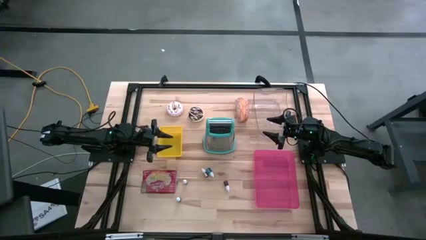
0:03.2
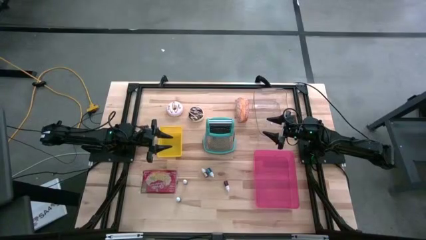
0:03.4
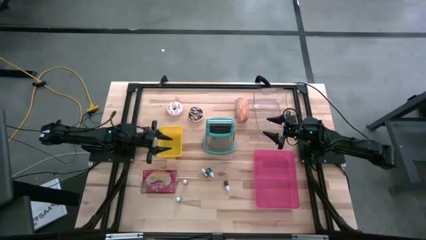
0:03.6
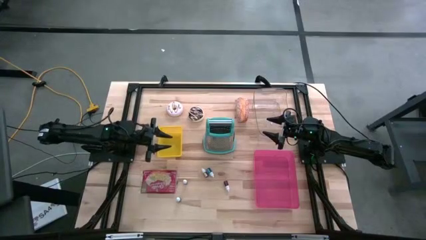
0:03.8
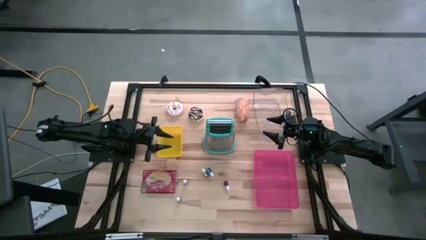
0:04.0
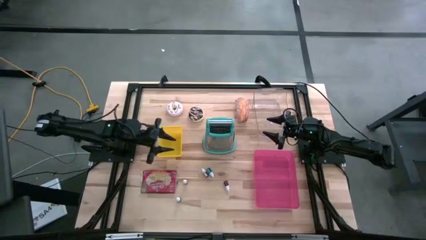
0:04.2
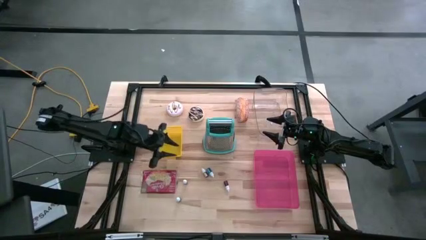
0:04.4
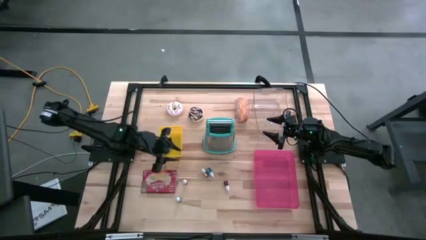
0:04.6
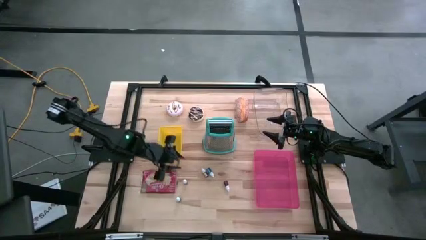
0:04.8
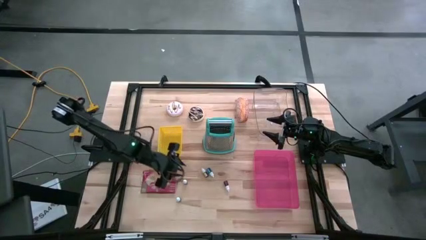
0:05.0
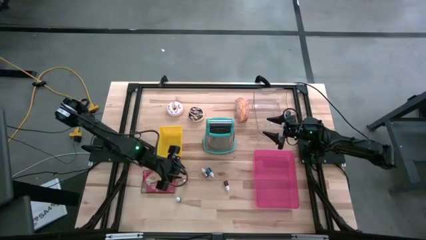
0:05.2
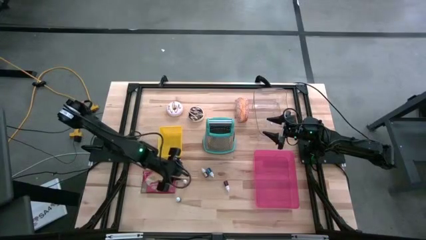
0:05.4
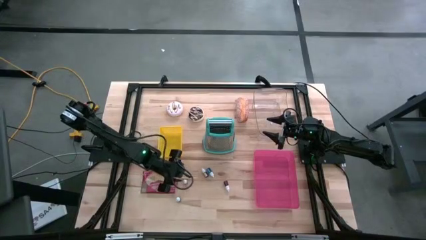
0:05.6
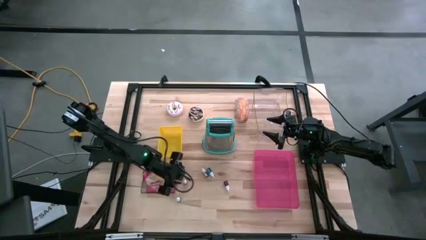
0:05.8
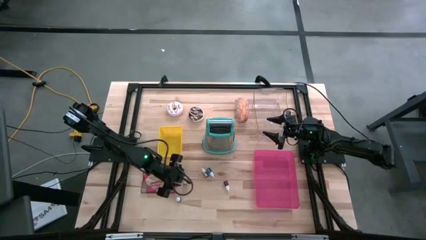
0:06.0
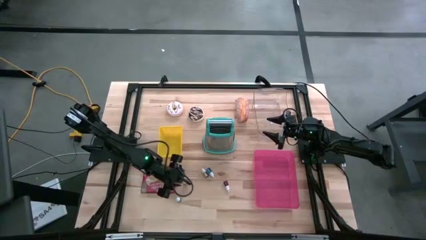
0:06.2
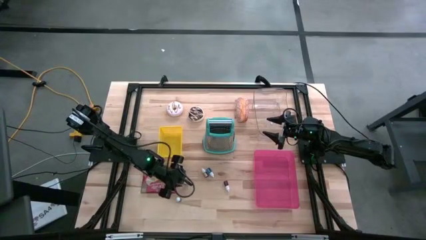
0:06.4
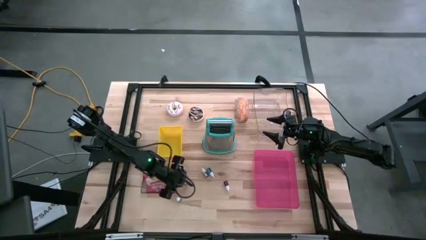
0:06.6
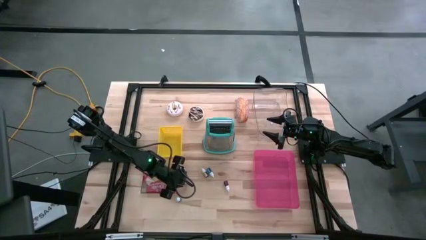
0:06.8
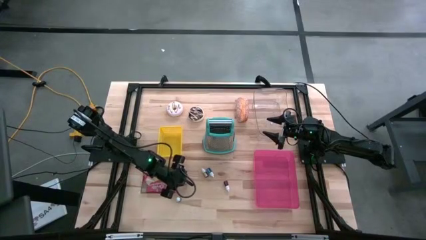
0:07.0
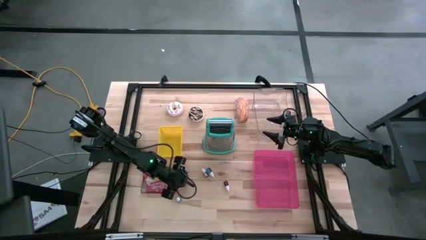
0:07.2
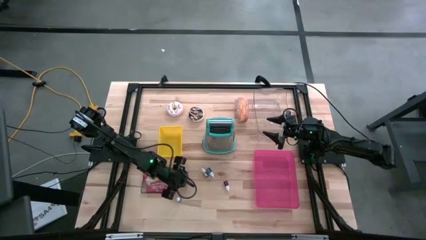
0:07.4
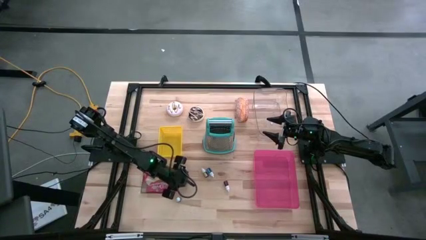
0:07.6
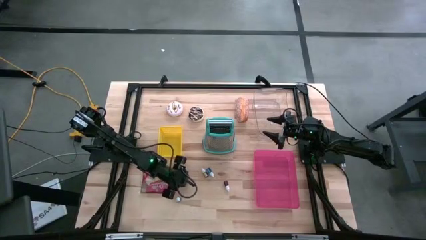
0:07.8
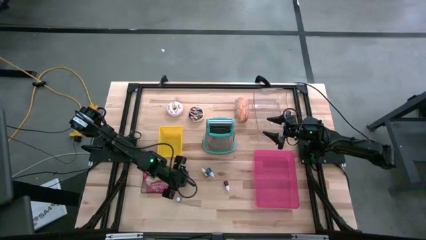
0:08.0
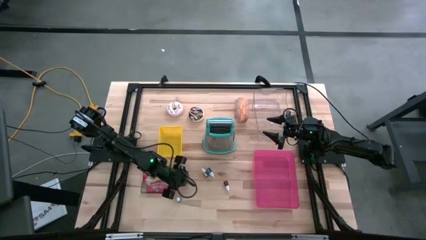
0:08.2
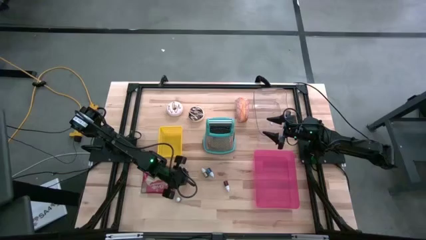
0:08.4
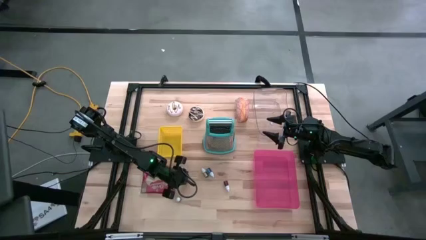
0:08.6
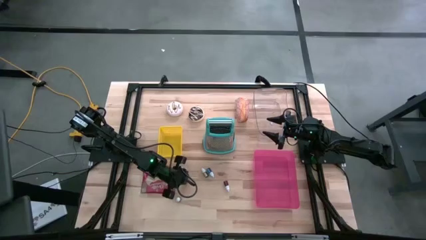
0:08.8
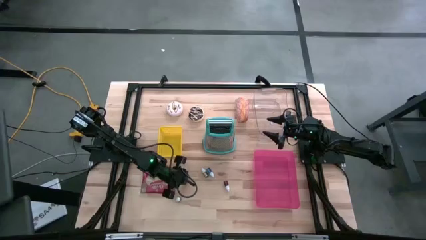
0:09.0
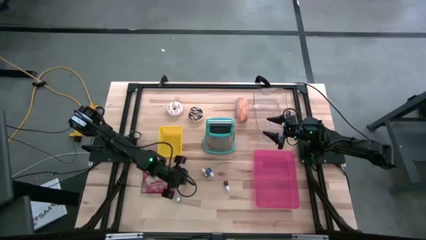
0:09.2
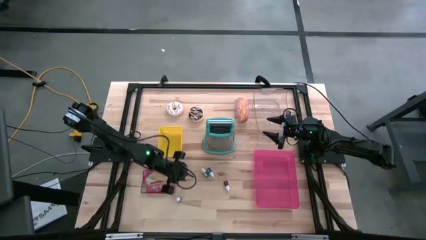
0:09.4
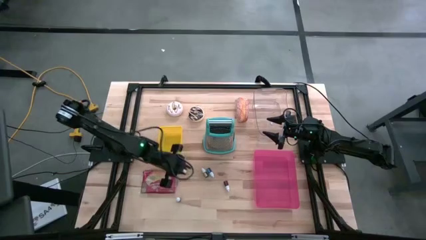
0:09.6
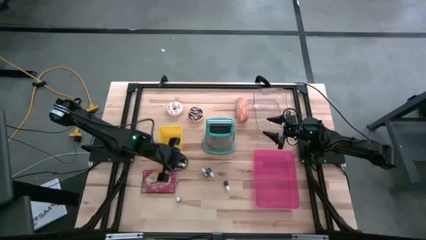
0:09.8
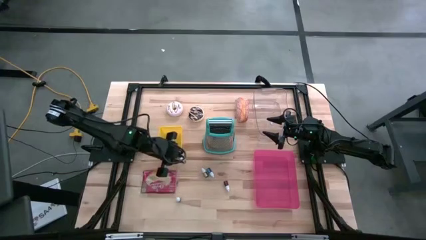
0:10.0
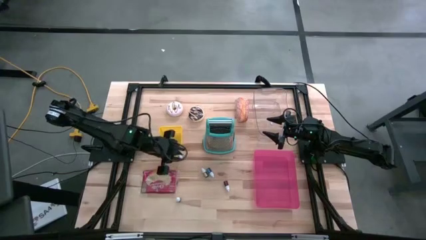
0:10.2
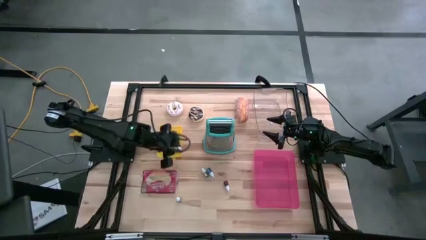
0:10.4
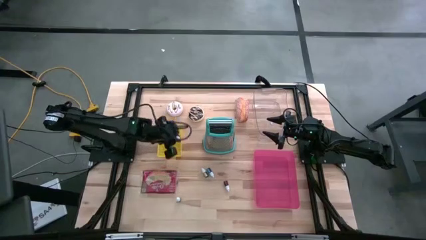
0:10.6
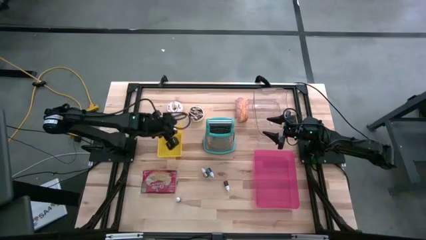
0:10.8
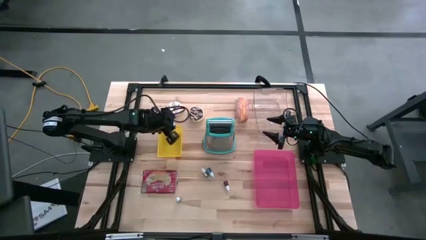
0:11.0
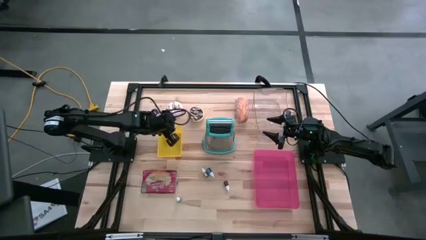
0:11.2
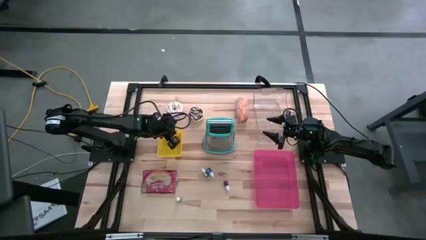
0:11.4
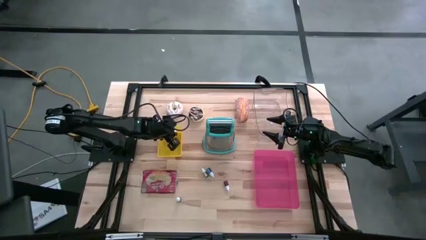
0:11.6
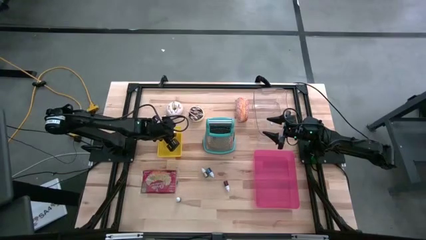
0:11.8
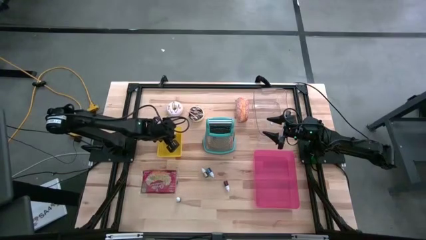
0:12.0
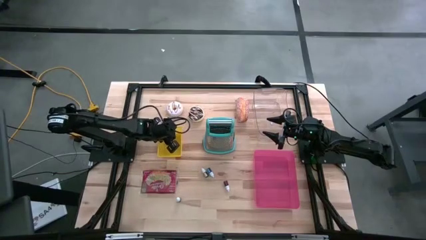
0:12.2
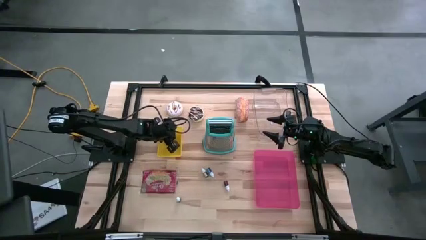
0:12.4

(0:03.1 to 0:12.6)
Put the left orange food coloring bottle into the yellow bin

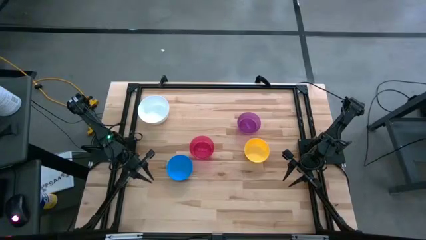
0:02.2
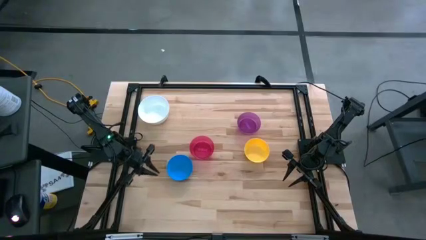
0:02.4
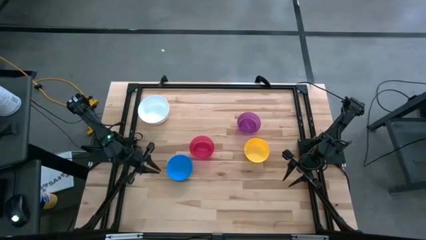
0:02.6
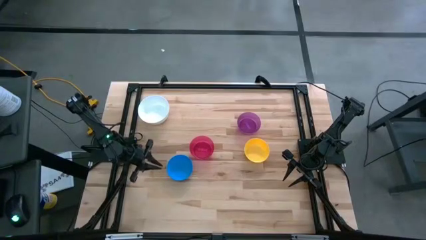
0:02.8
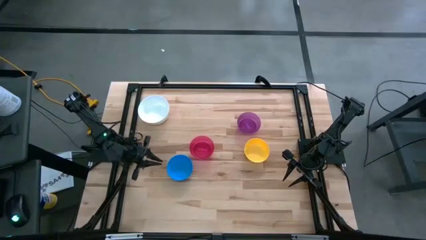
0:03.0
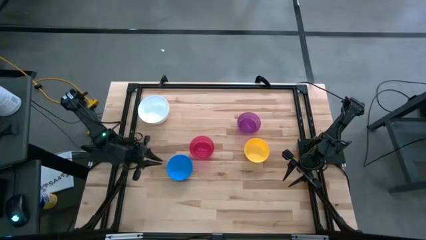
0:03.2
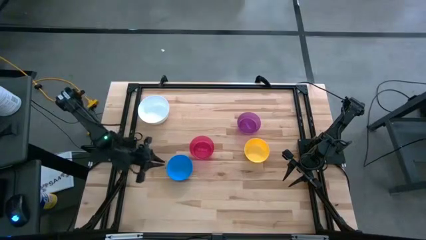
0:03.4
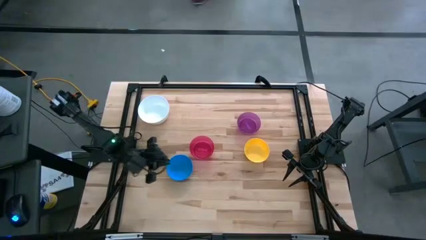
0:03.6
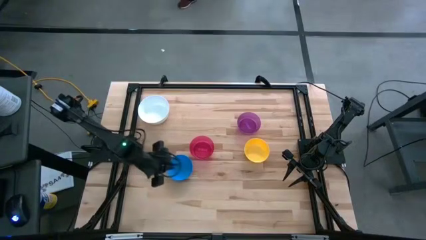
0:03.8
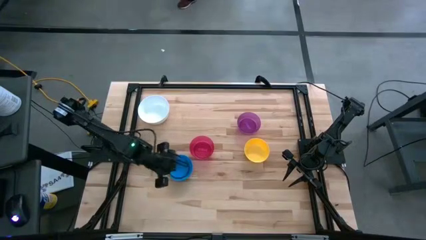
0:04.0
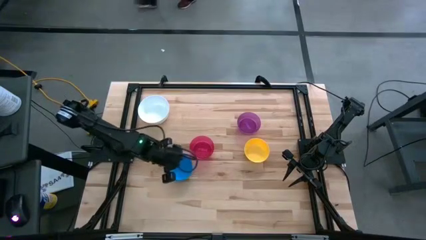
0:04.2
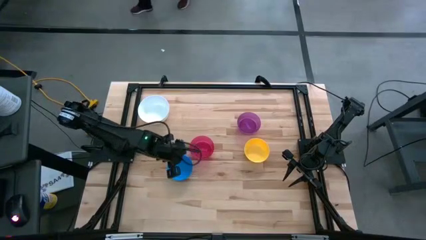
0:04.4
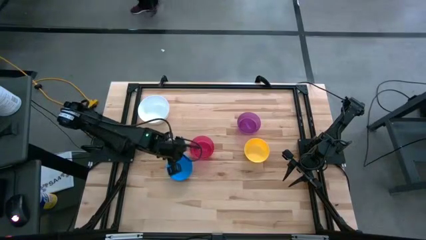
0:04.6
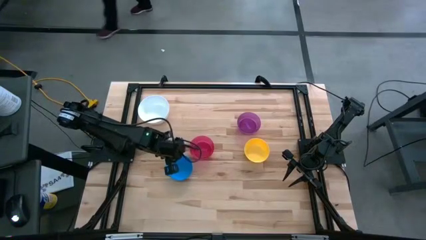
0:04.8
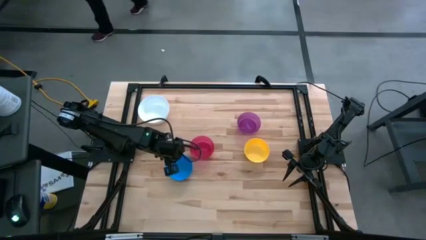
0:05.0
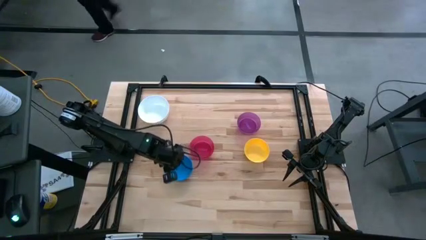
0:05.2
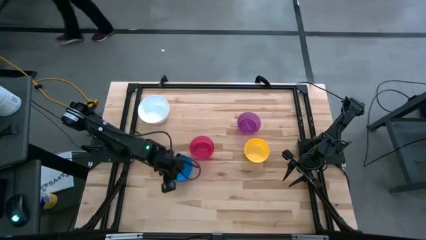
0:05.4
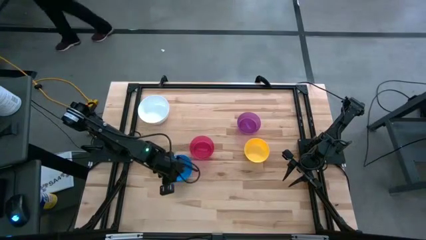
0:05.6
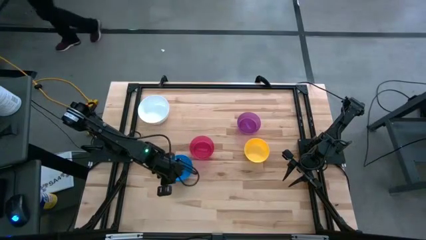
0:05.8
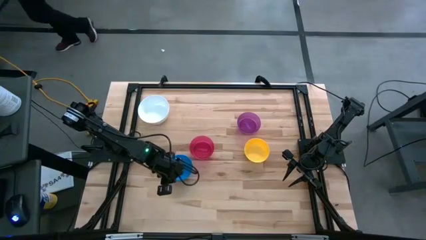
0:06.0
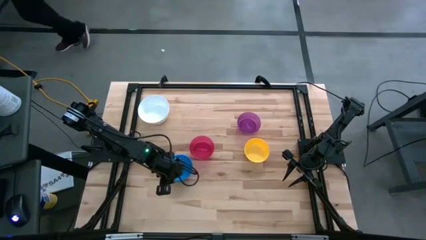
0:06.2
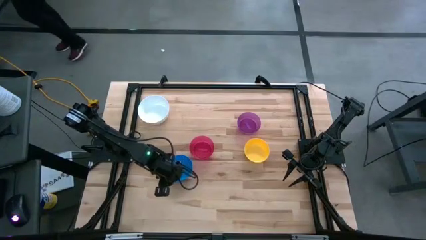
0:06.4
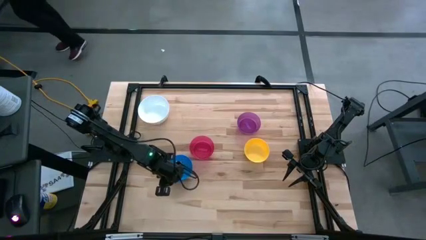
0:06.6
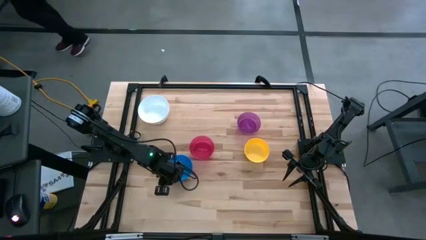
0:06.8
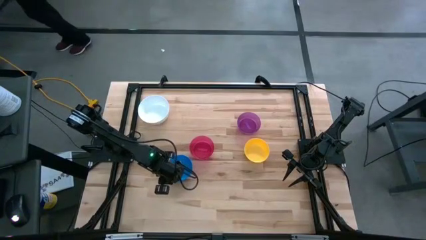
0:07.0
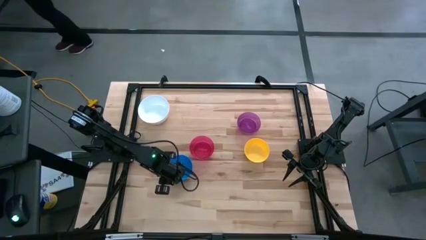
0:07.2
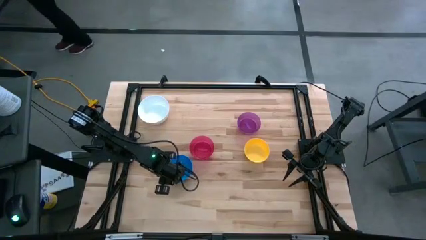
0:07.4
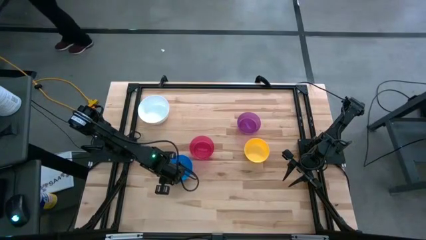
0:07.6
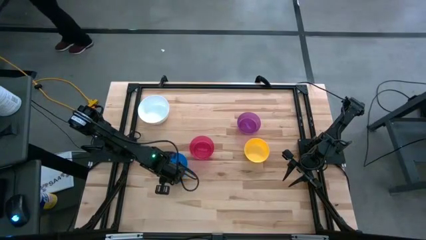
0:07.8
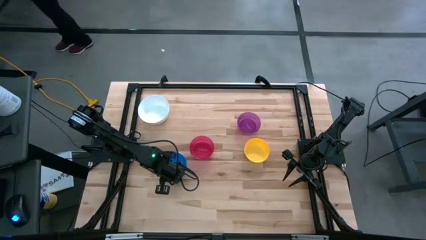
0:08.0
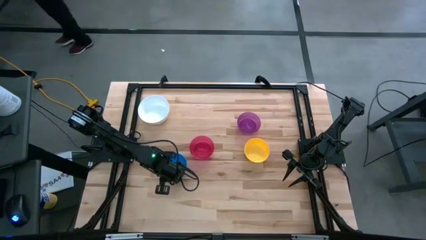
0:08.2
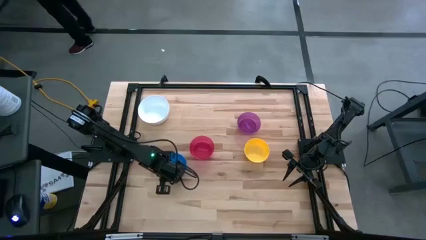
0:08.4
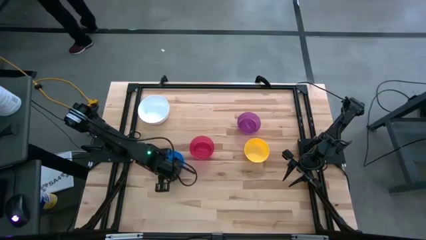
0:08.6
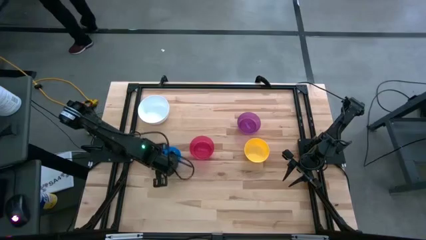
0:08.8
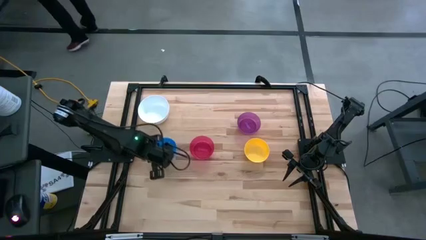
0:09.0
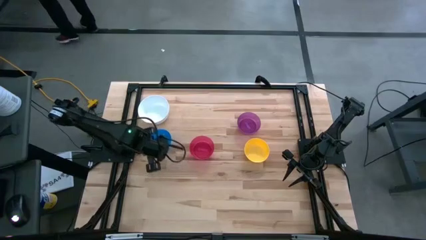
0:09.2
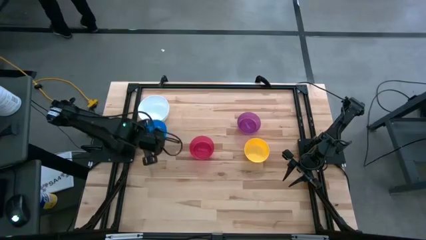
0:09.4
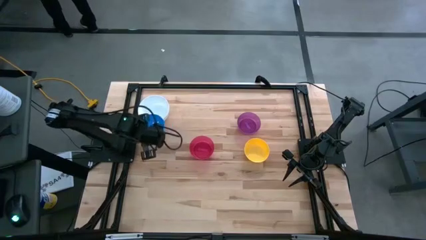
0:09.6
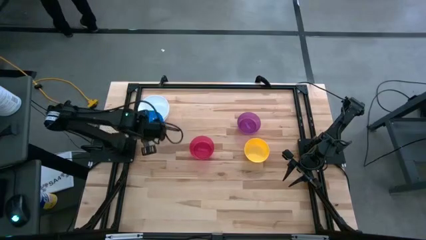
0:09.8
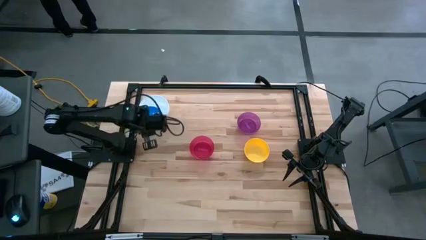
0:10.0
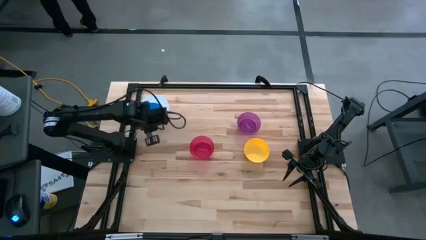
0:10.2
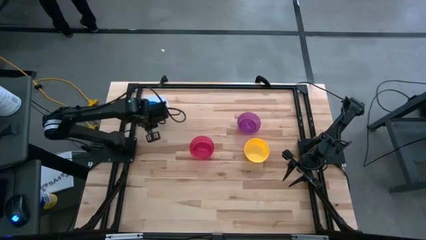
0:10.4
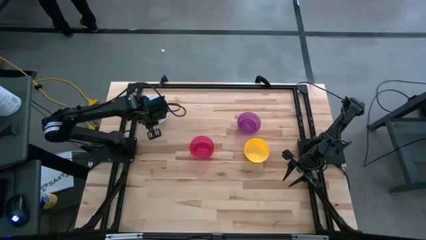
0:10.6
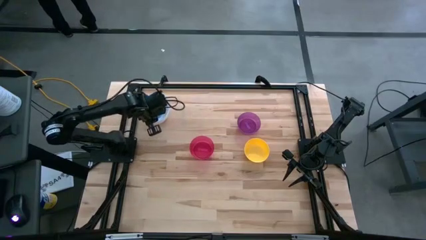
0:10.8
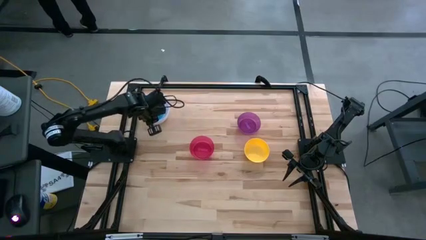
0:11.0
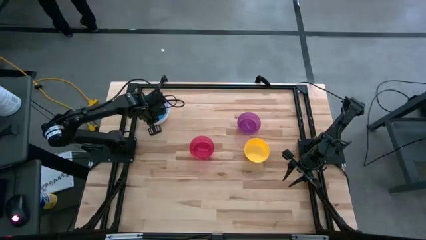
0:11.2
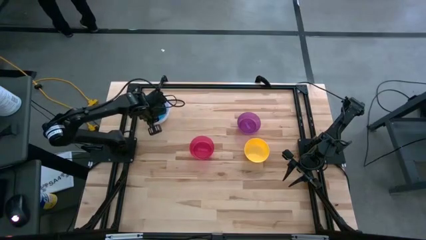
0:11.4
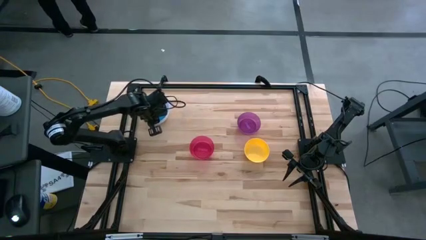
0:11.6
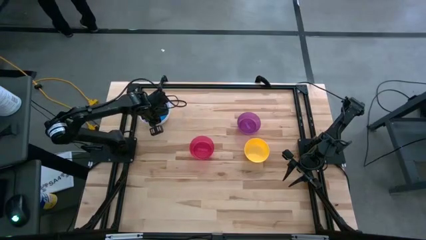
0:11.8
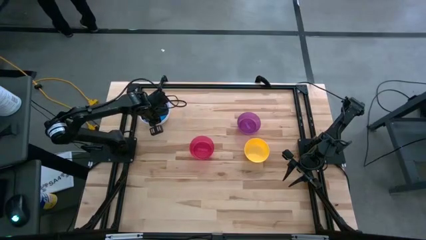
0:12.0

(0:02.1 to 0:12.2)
Stack the blue bowl on top of the white bowl
